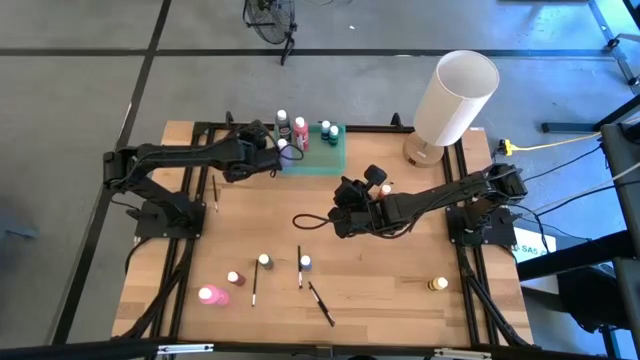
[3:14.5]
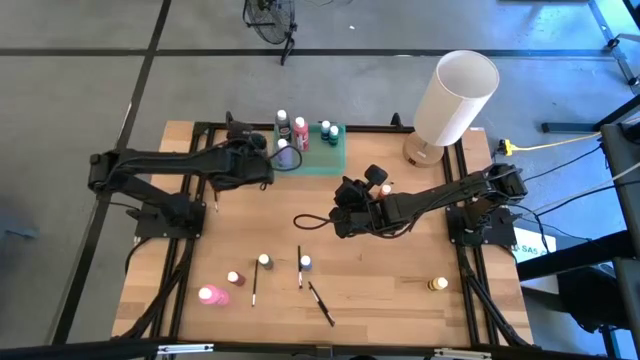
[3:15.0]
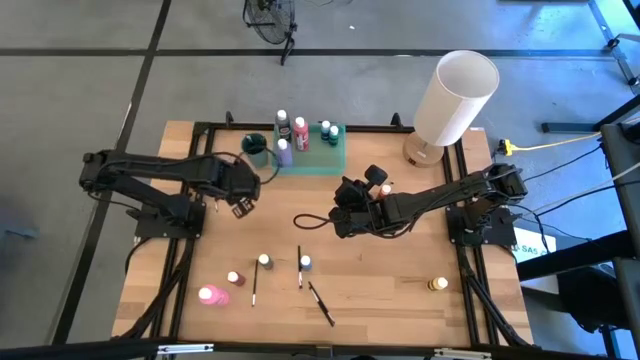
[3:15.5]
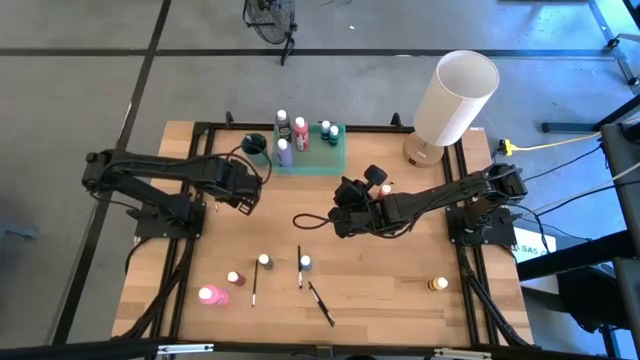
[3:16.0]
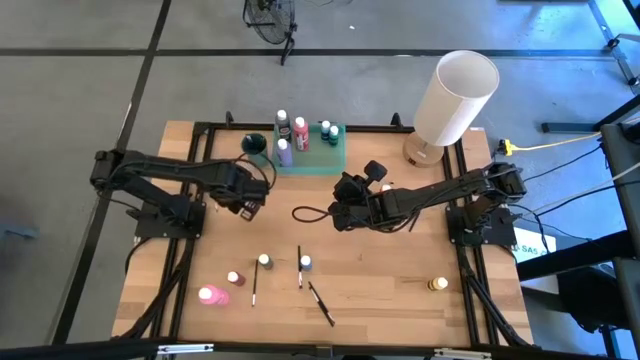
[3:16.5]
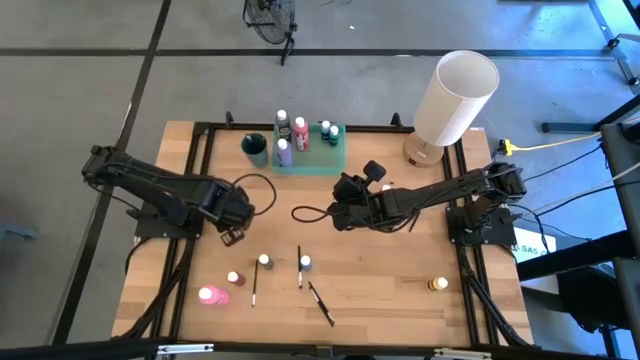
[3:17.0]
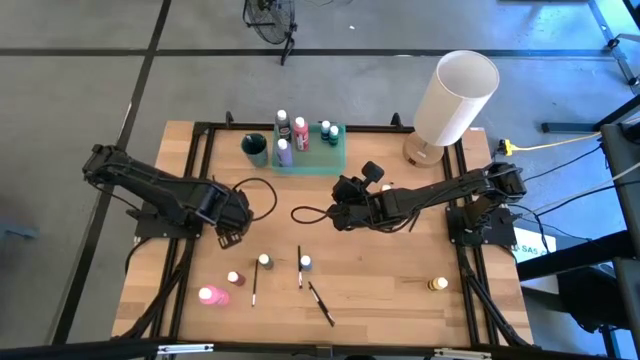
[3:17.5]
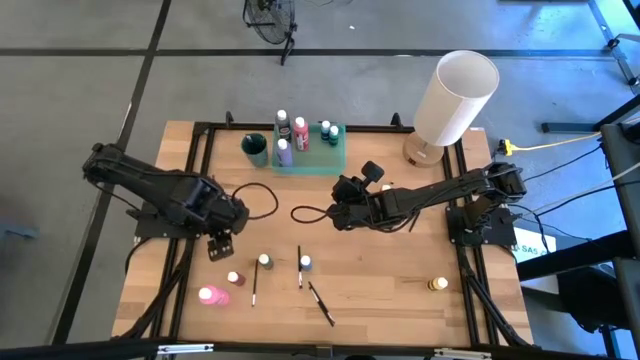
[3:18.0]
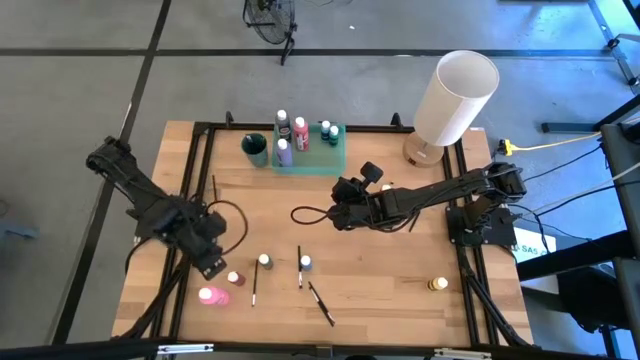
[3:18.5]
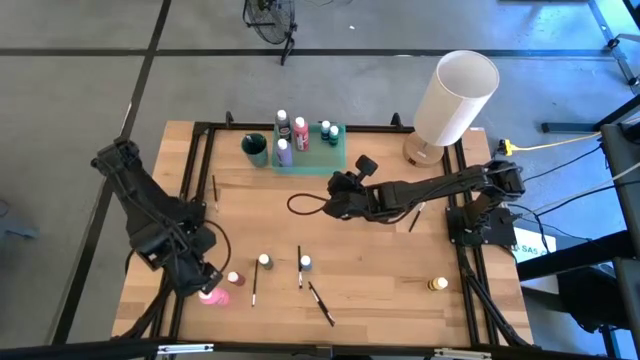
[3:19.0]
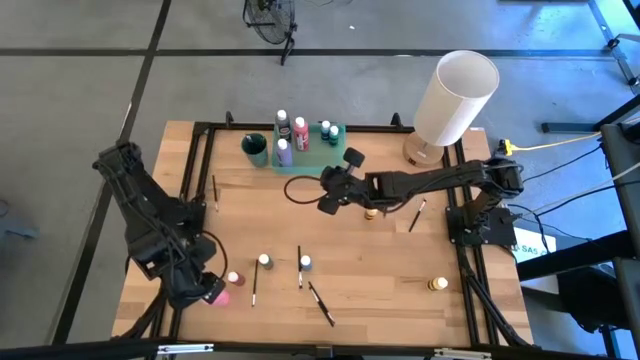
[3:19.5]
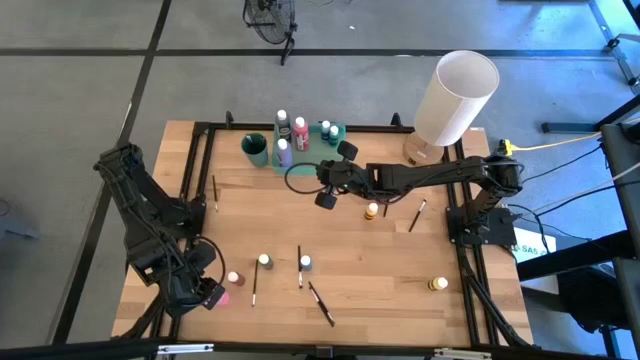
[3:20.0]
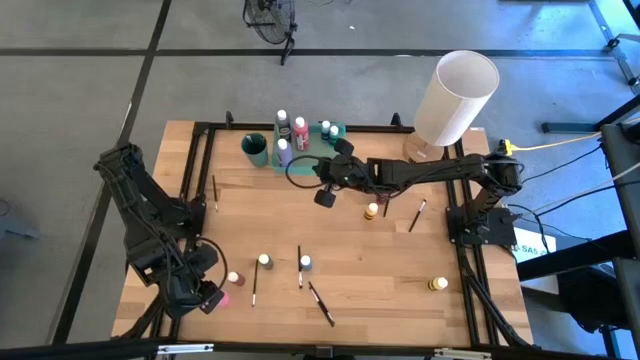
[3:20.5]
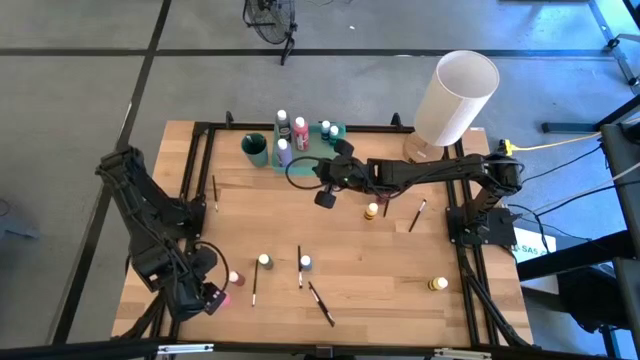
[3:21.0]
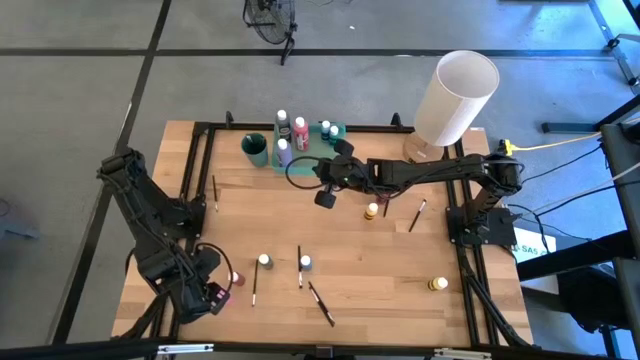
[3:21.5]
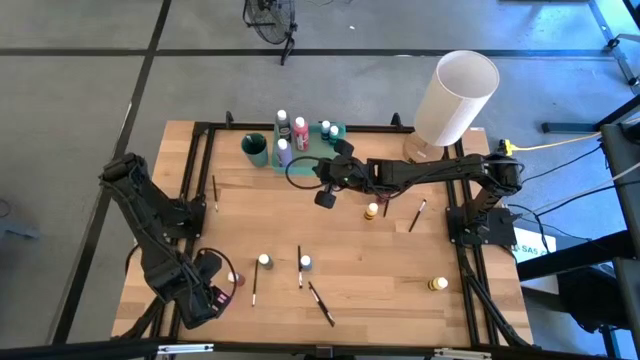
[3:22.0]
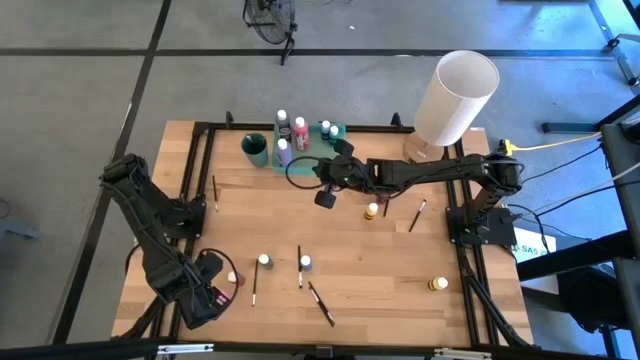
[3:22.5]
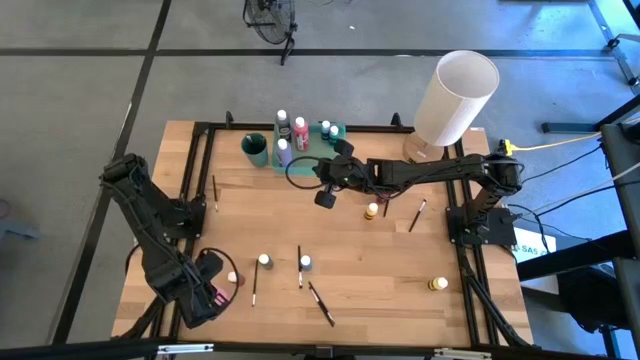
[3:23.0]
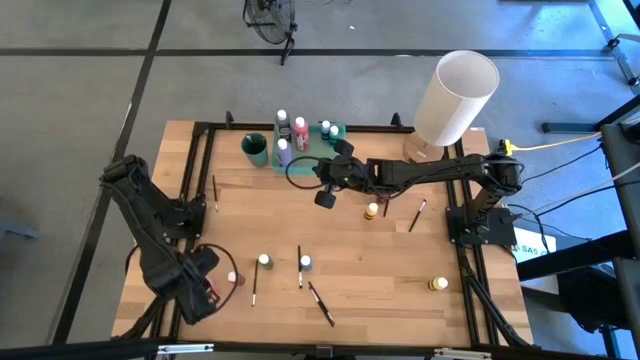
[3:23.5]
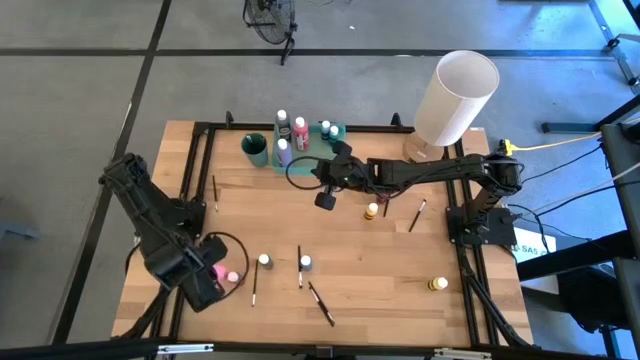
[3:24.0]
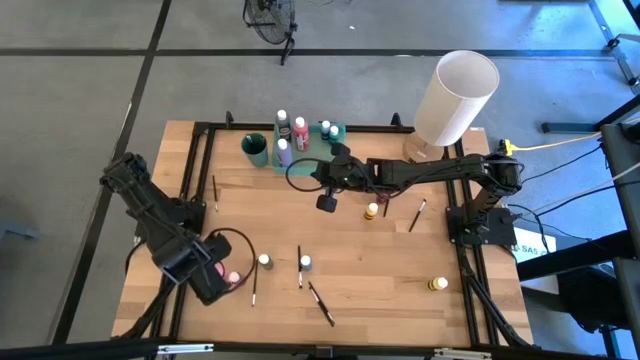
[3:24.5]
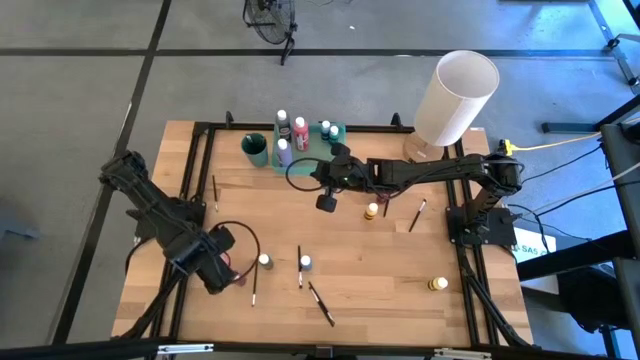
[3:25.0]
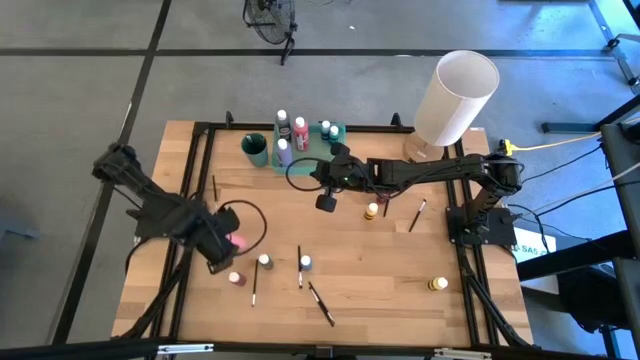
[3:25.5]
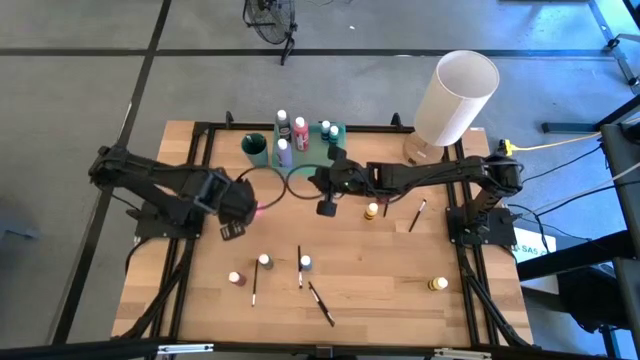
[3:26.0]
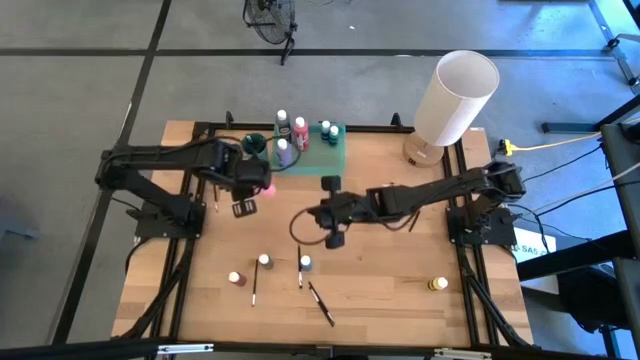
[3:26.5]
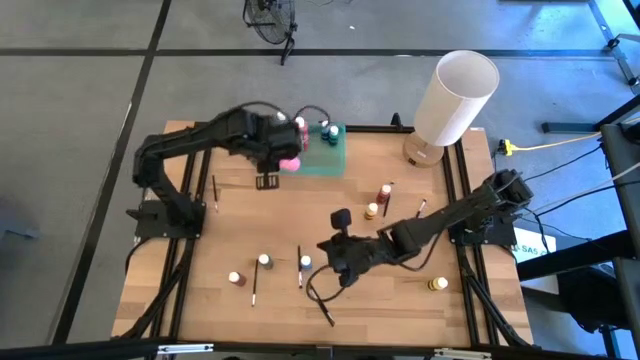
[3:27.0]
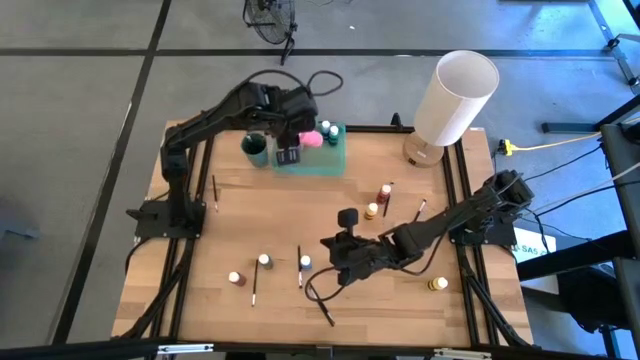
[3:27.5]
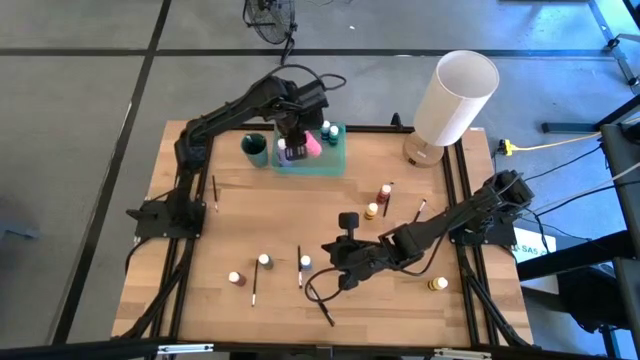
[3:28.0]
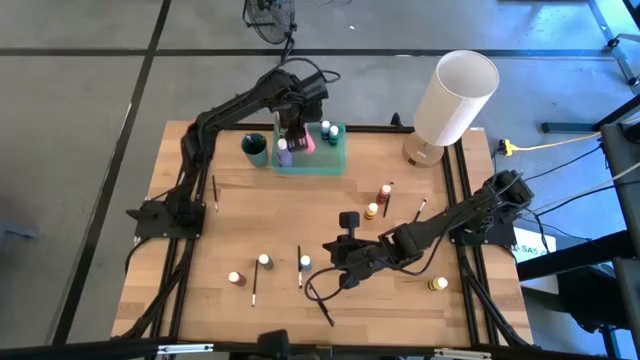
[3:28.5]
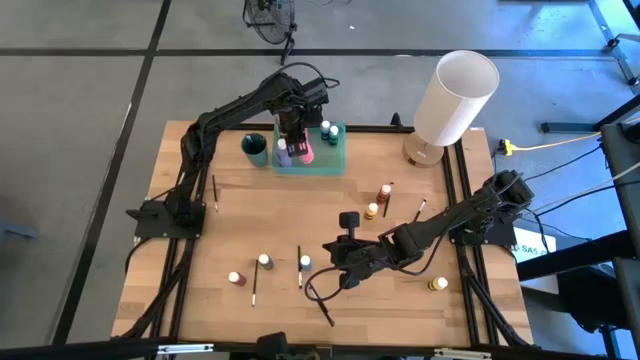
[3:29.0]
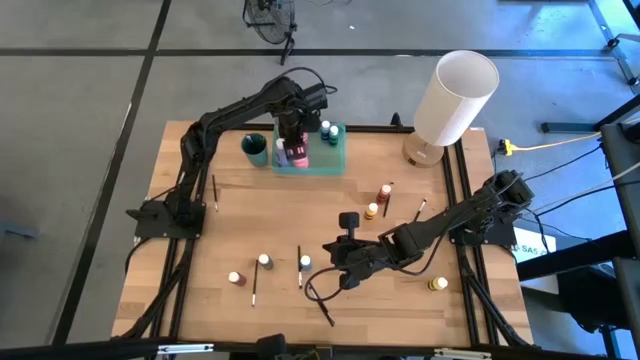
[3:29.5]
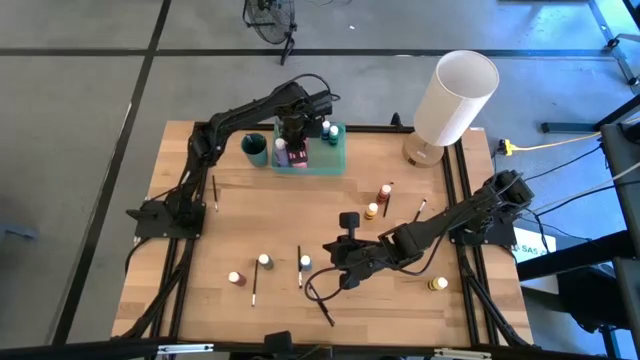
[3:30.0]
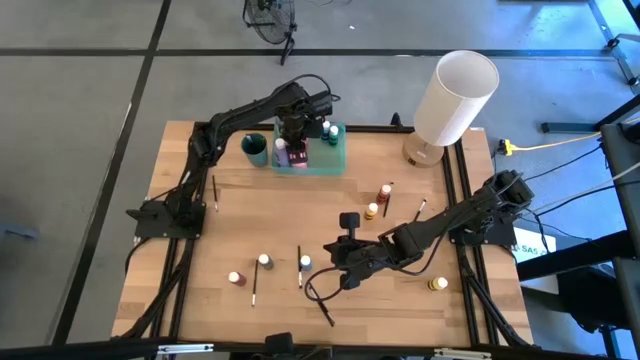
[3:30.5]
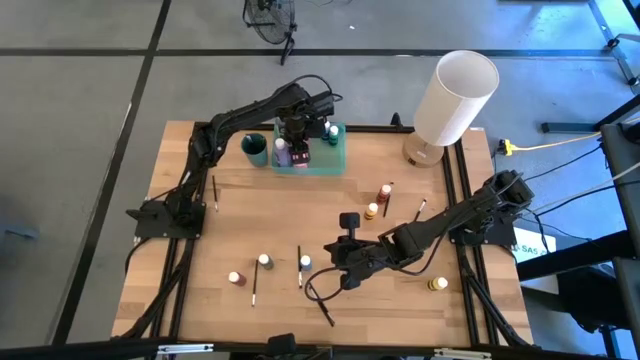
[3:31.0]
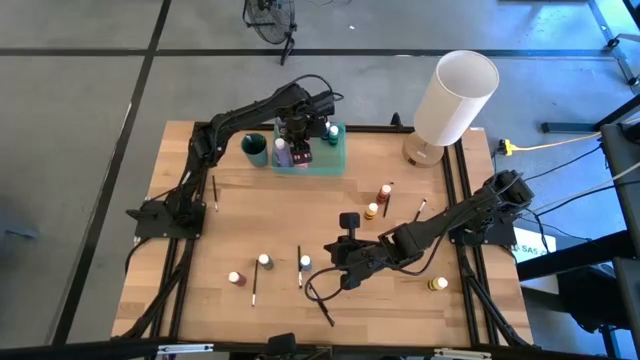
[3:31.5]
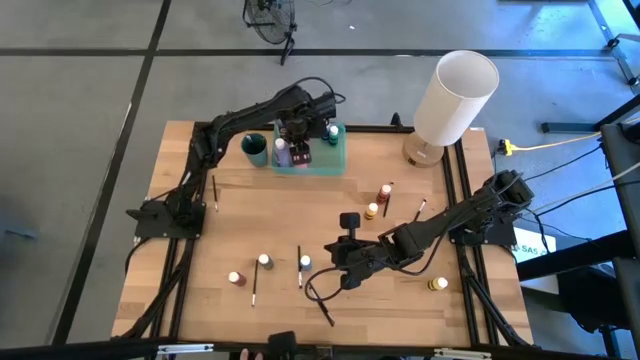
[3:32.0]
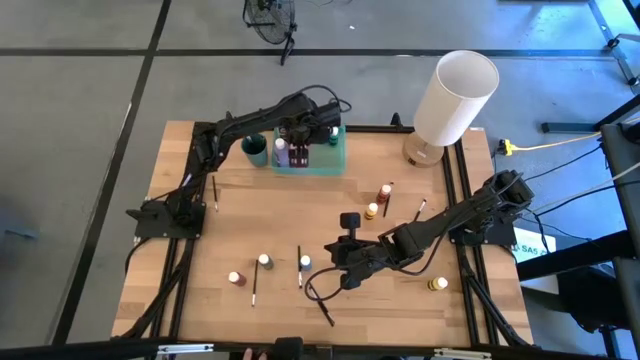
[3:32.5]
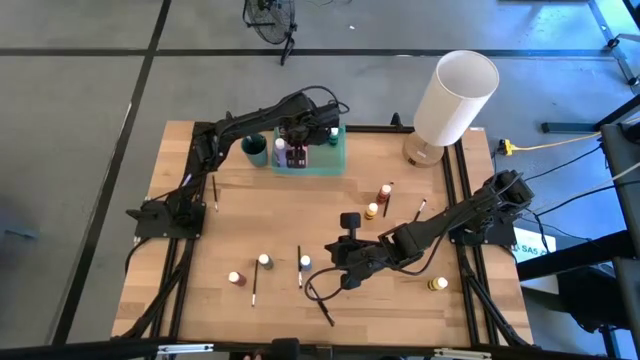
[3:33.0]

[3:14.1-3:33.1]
Task: Pick & Place Paint Supplies
Put the big pink paint bottle into the green bin

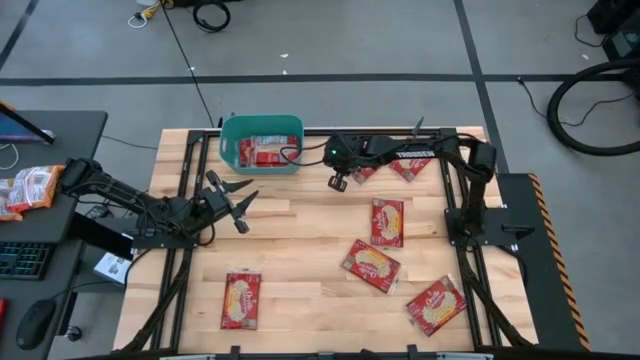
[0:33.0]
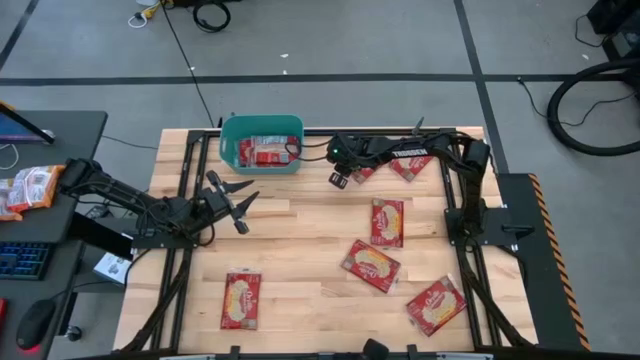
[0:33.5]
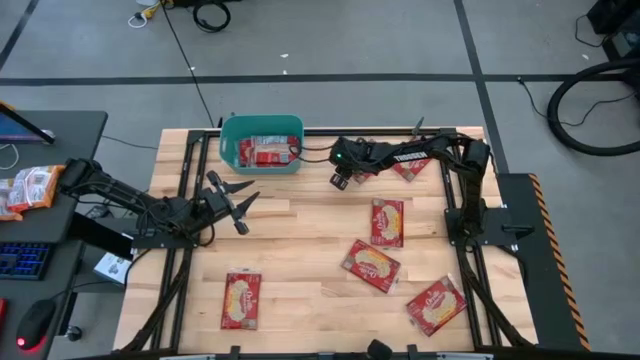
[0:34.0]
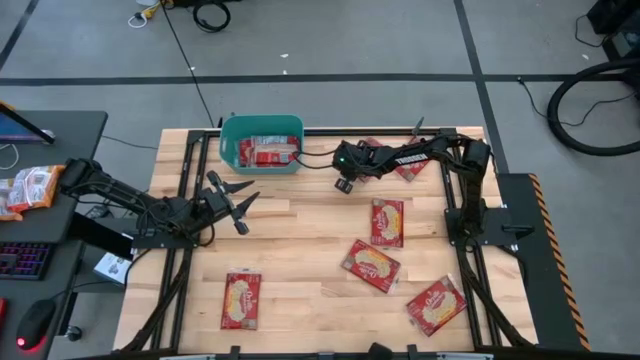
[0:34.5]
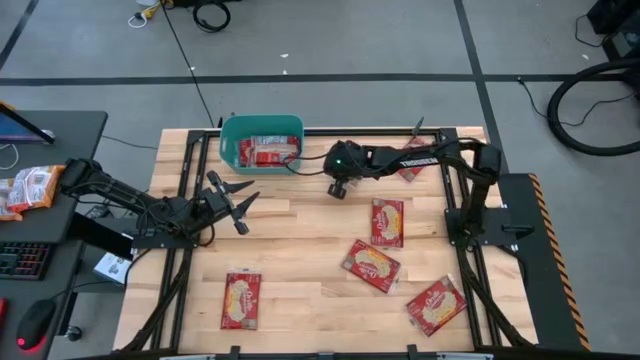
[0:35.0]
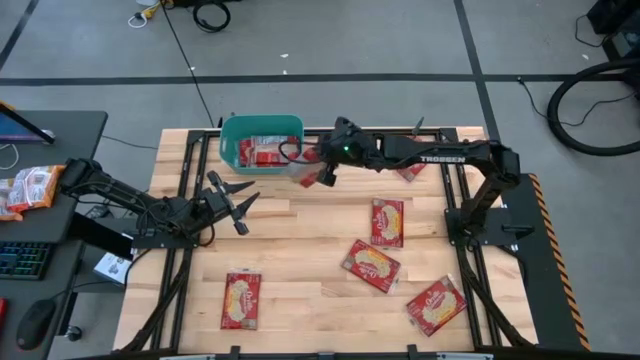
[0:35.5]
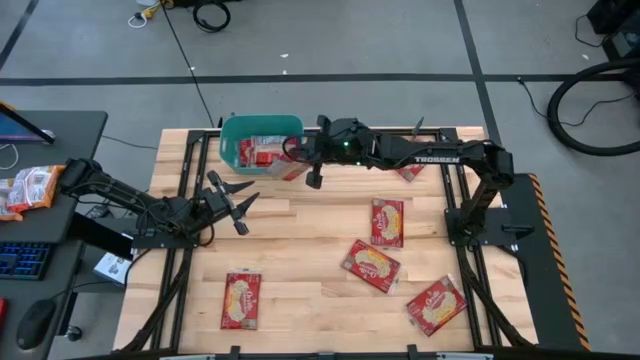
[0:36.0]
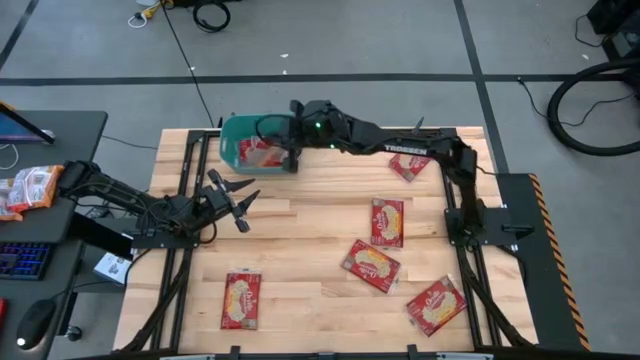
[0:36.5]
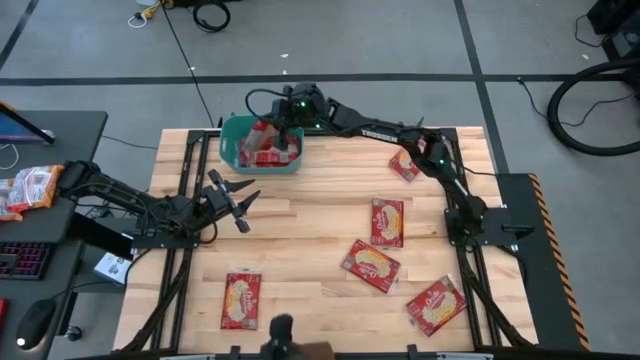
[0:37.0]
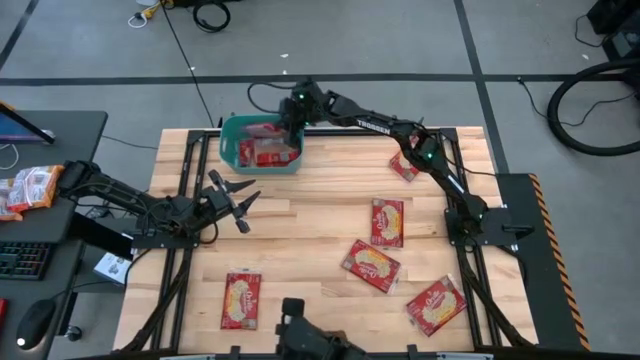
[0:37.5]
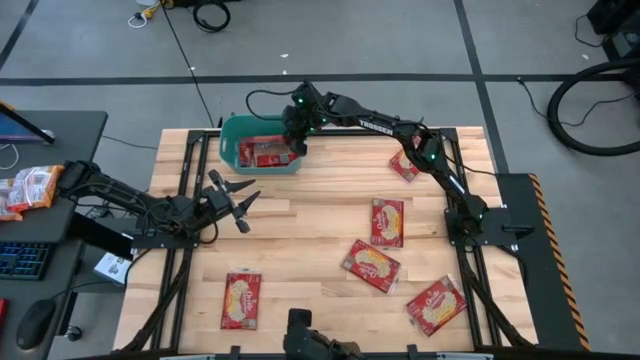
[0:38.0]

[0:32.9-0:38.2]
Task: Sort popcorn bags into baskets
Put the popcorn bag into the blue bin
